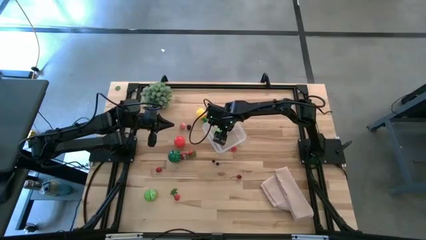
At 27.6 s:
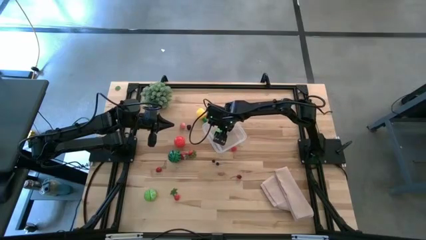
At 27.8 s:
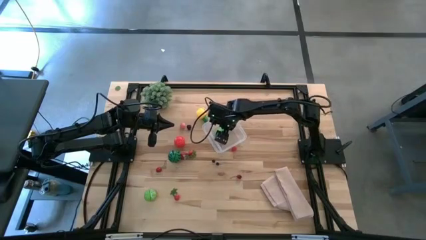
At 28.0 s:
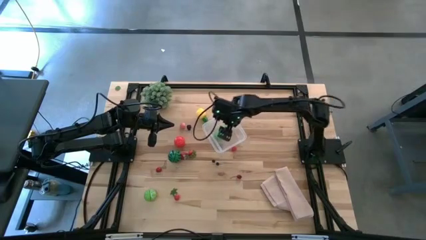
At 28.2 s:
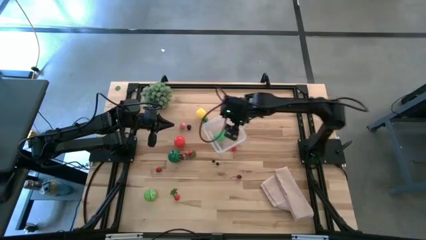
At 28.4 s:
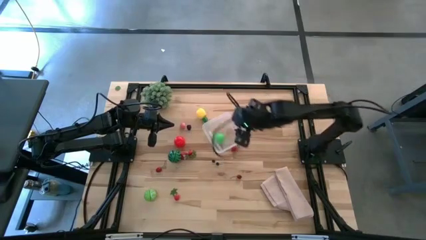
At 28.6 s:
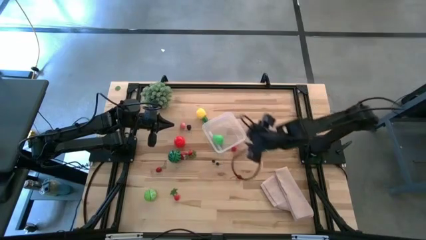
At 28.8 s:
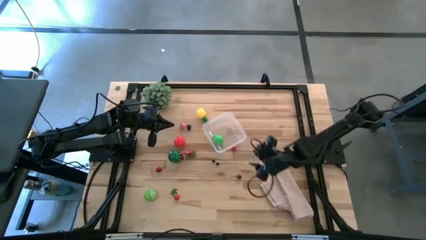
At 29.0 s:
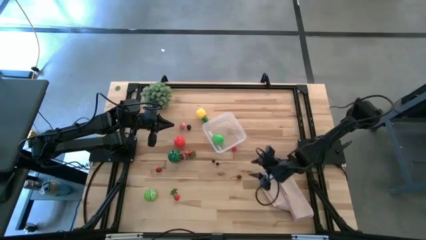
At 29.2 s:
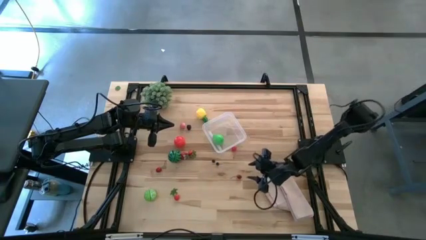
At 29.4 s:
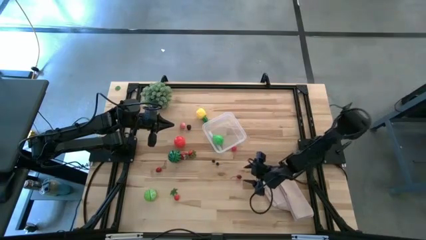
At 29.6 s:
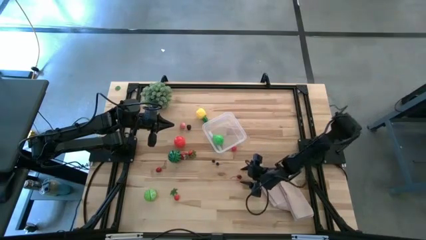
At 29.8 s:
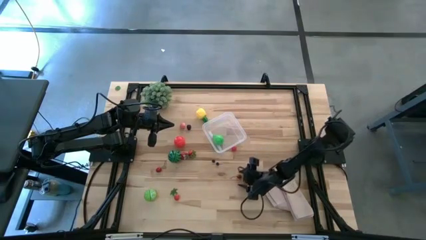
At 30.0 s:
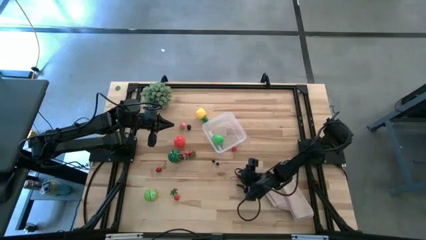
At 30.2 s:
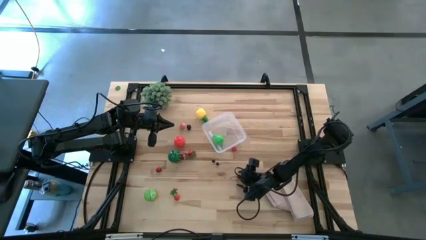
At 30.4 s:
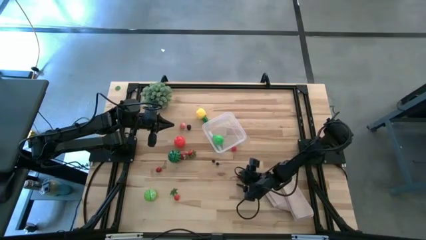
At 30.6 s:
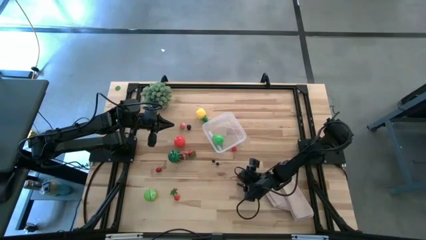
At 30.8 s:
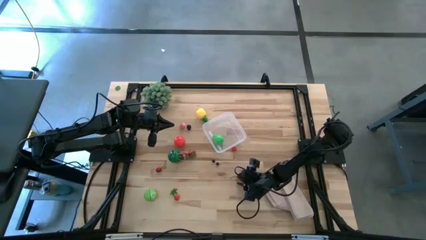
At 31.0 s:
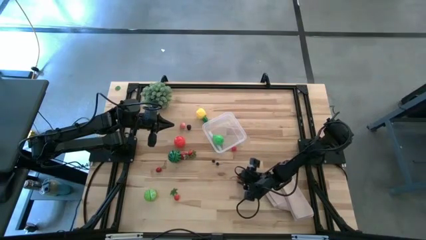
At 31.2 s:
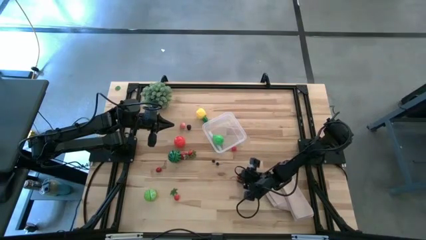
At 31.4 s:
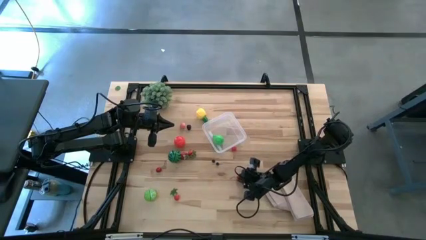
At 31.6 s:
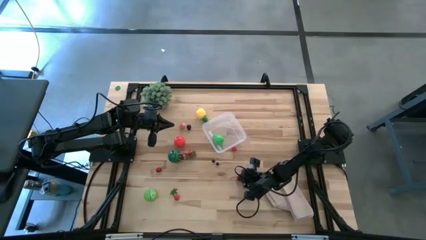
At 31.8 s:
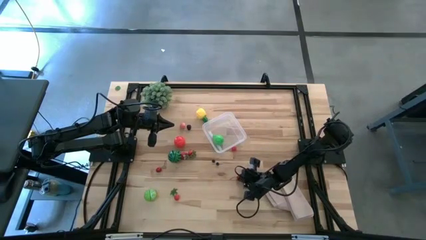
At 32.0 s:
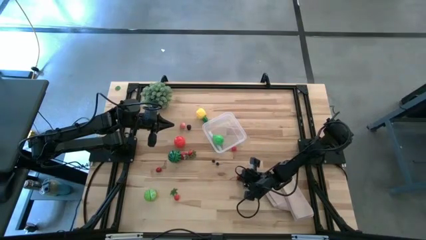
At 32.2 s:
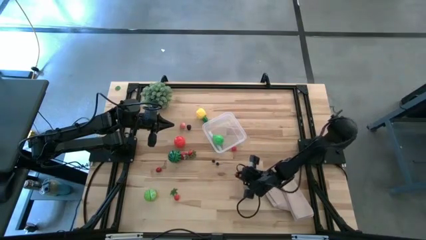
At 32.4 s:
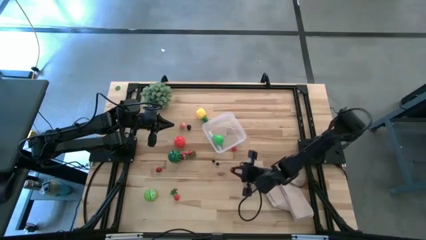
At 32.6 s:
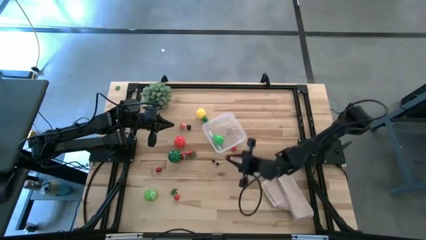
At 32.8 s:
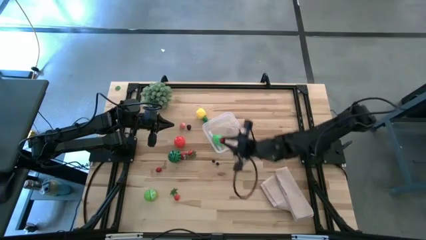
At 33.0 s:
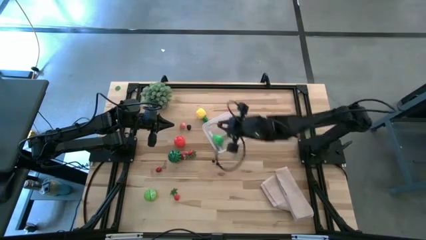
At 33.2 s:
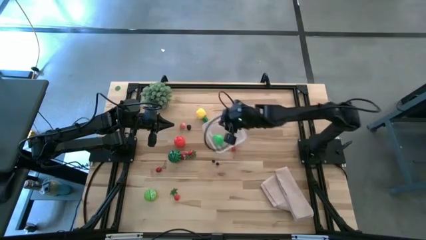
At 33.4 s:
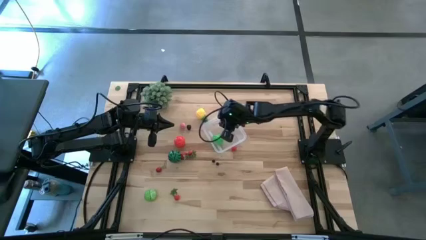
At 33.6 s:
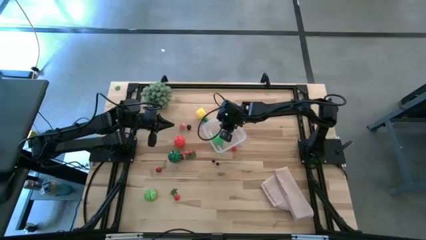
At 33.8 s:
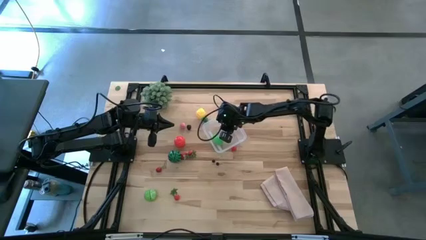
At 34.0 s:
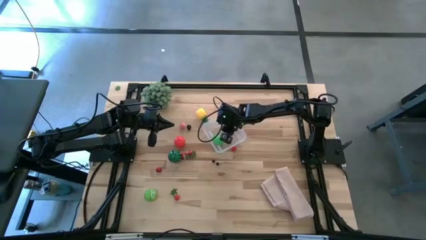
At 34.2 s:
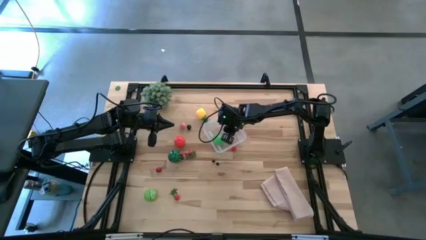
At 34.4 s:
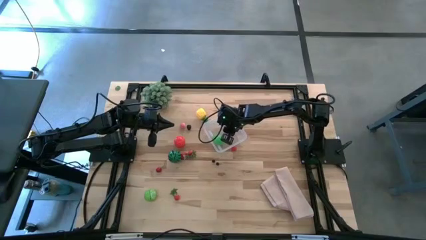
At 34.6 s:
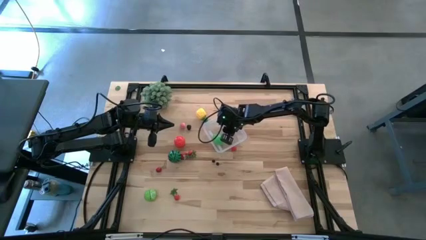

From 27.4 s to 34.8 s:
Task: Pick and placing Produce into tupperware
Put the red cherry into the transparent bin

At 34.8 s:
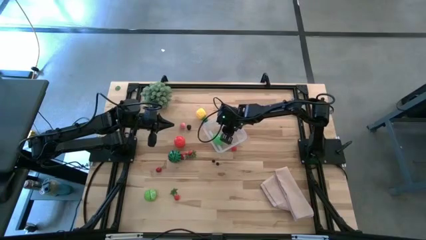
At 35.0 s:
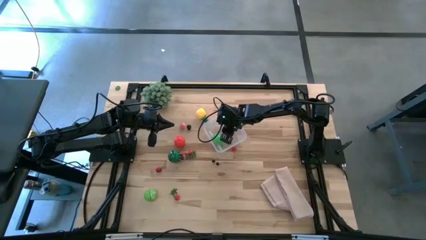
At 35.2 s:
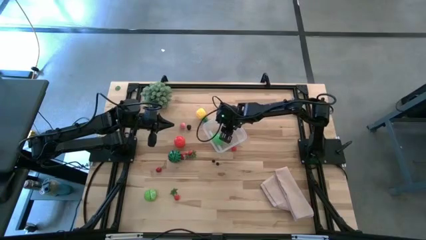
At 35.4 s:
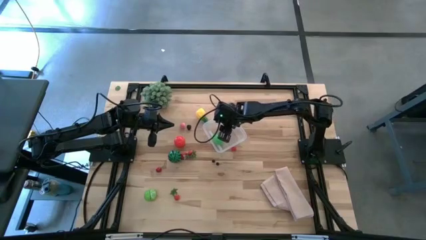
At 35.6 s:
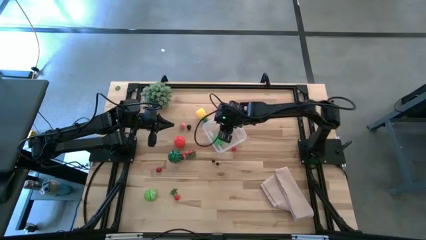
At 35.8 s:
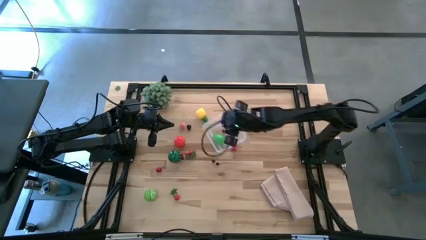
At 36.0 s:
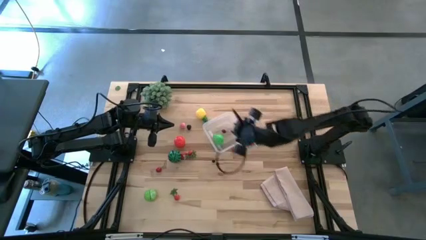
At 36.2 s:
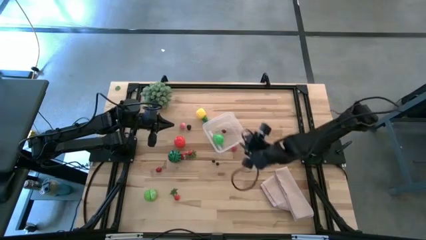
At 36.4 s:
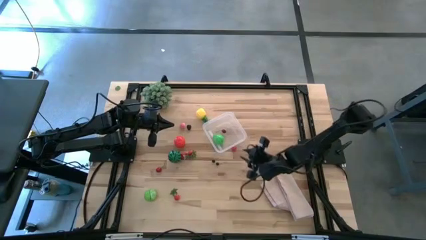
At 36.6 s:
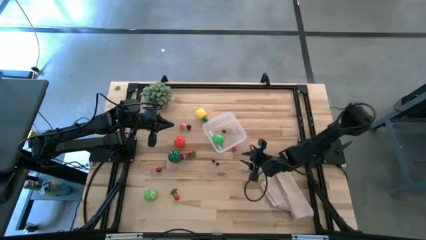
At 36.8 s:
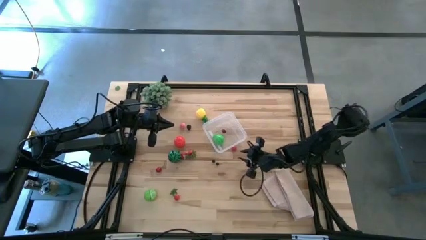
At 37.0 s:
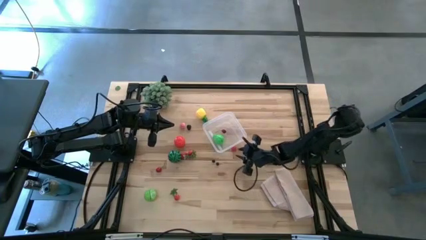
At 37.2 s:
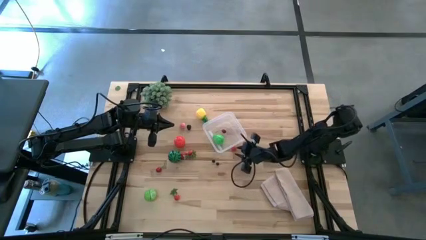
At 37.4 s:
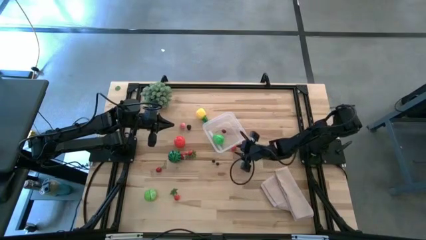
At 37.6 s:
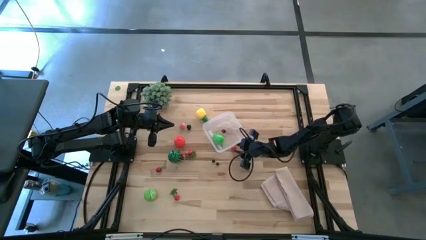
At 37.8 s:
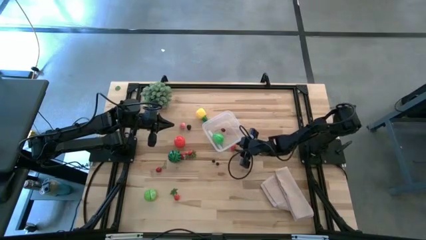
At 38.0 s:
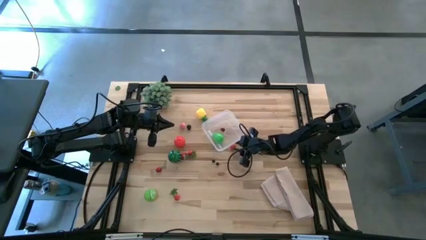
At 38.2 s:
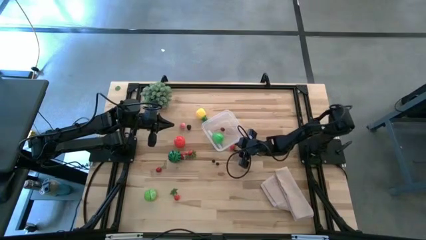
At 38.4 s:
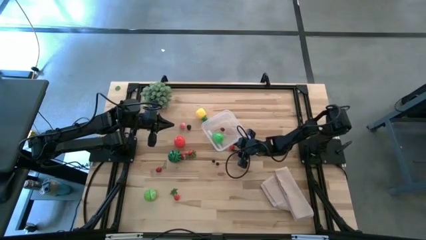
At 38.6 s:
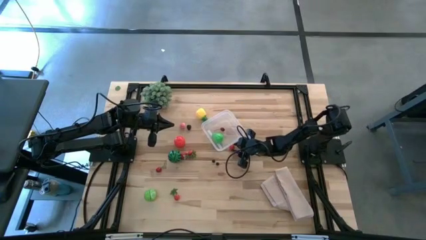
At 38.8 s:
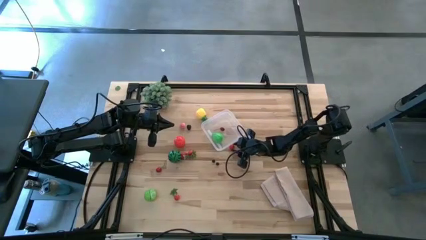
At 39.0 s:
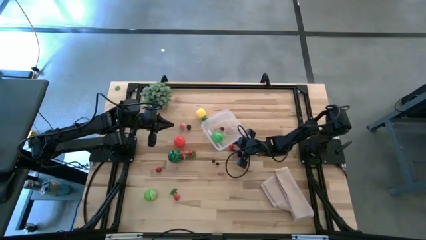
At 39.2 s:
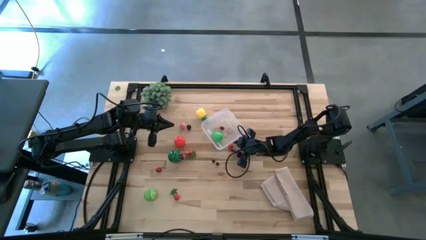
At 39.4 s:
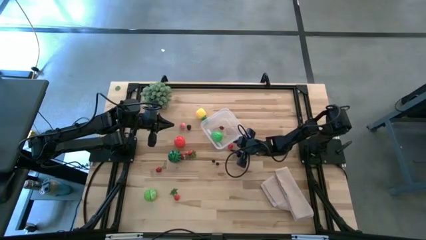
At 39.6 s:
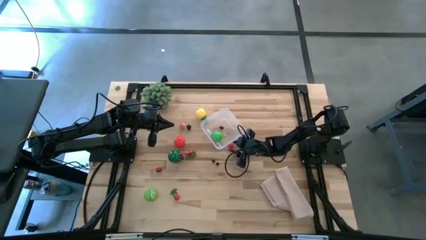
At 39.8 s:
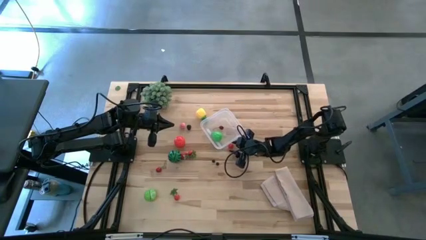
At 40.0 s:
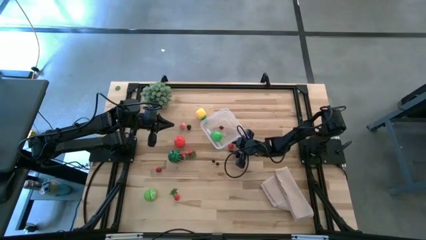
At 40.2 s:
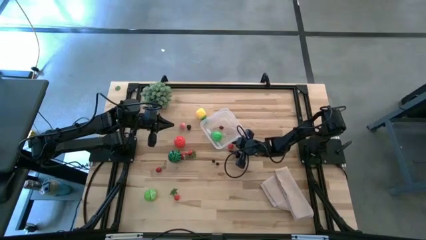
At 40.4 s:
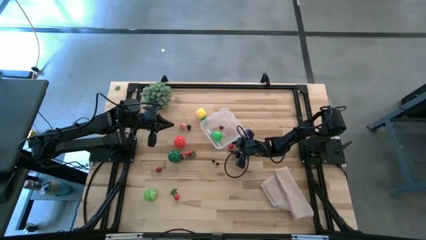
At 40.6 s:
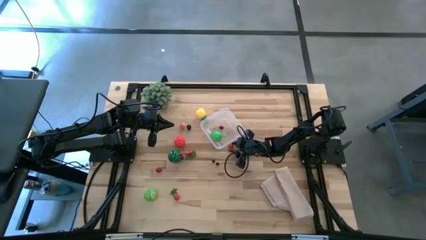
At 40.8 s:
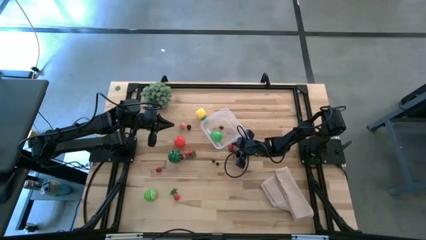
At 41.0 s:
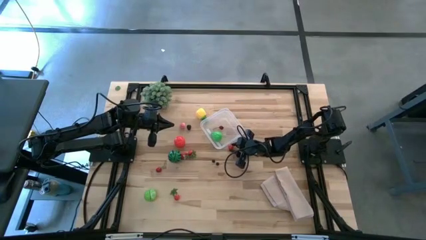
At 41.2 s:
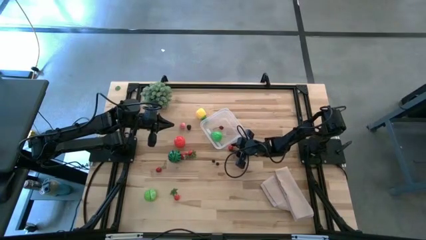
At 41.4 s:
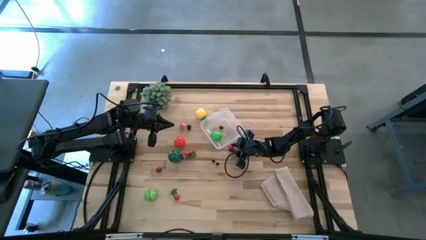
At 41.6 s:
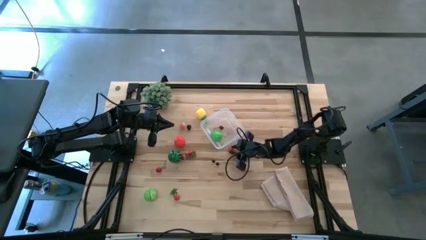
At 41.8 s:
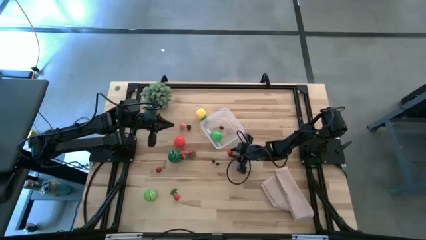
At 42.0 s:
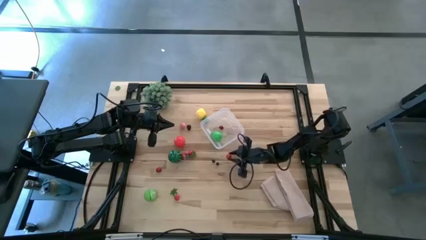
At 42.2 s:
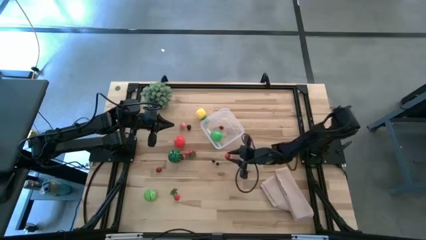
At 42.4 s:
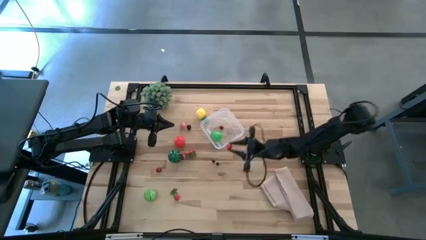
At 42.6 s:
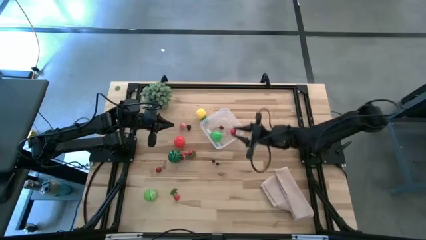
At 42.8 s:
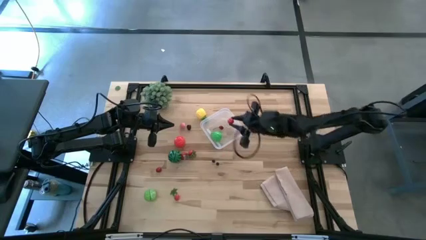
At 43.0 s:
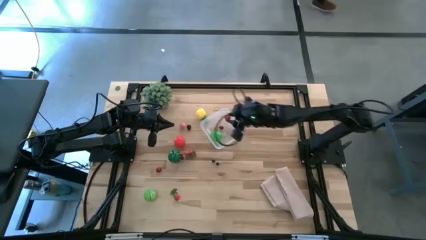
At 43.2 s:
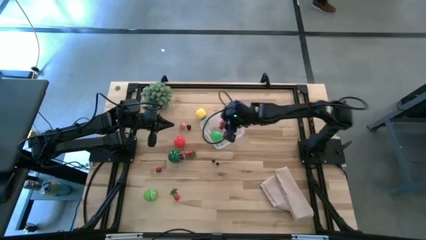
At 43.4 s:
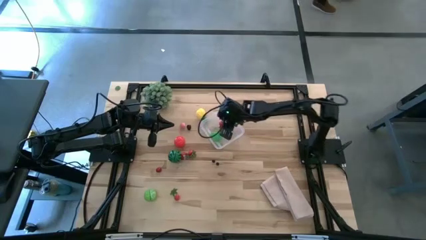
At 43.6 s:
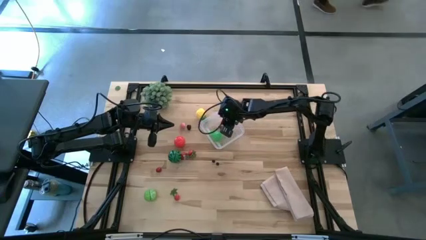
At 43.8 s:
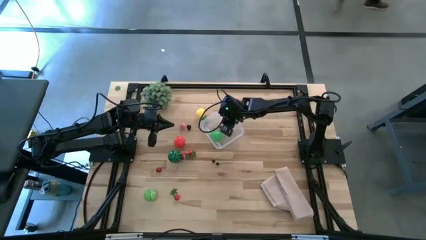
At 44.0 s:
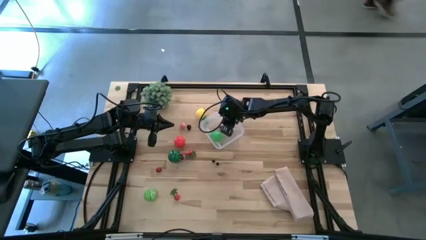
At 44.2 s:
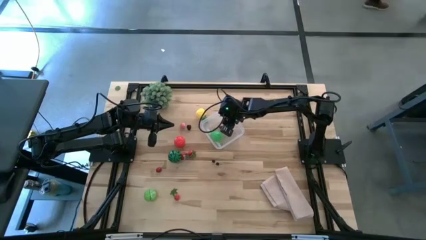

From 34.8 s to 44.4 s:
Put the red cherry into the transparent bin
